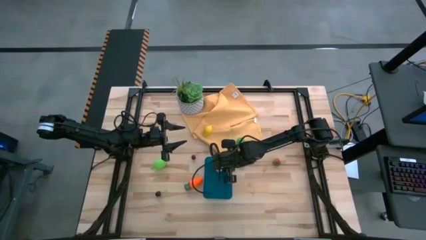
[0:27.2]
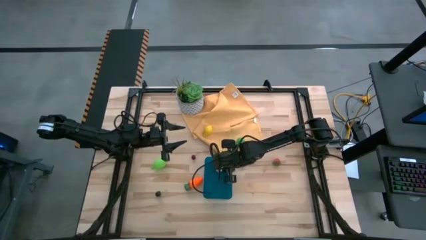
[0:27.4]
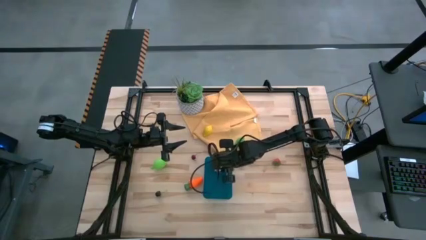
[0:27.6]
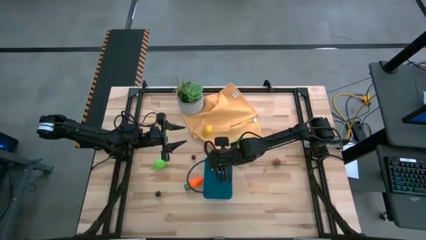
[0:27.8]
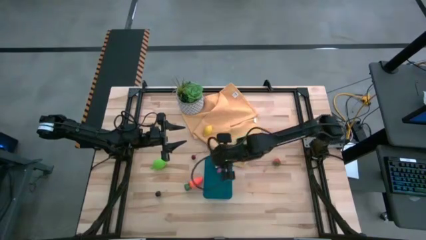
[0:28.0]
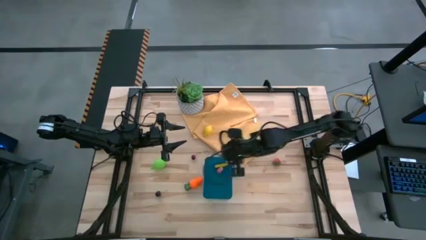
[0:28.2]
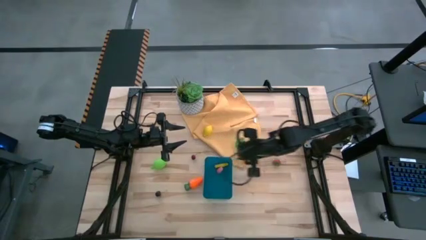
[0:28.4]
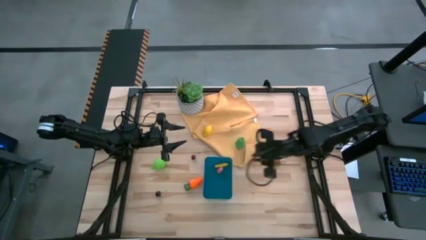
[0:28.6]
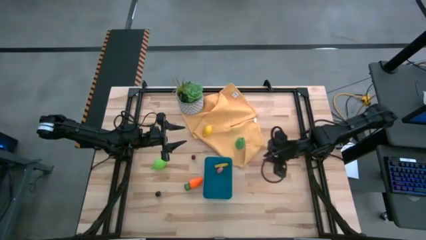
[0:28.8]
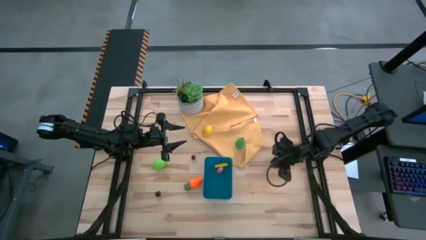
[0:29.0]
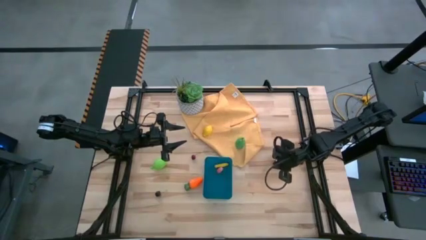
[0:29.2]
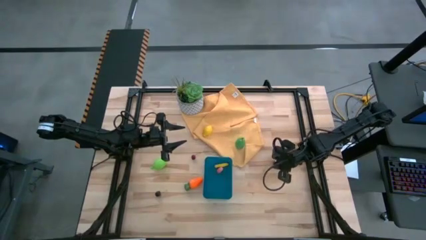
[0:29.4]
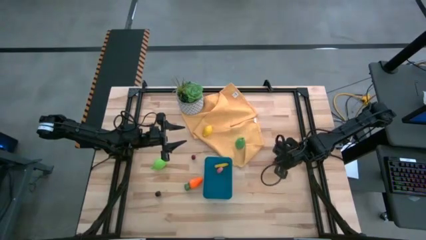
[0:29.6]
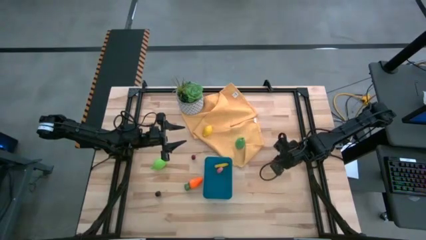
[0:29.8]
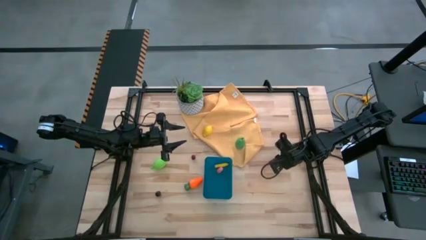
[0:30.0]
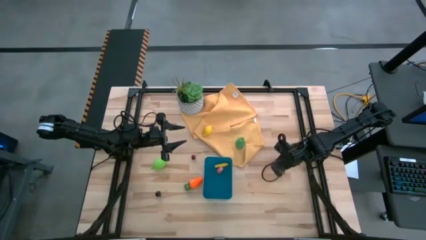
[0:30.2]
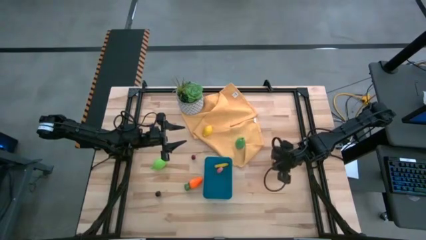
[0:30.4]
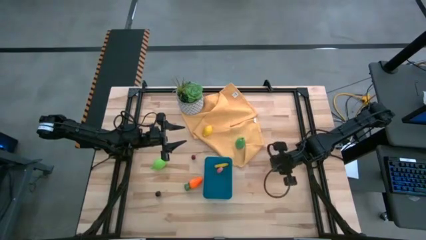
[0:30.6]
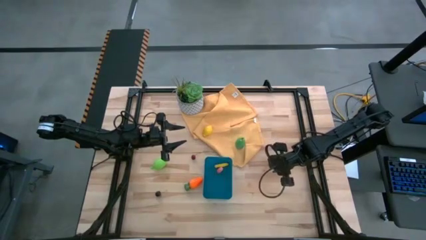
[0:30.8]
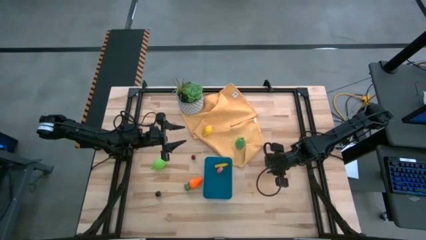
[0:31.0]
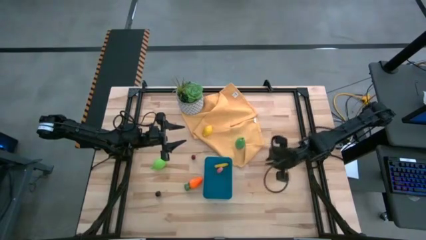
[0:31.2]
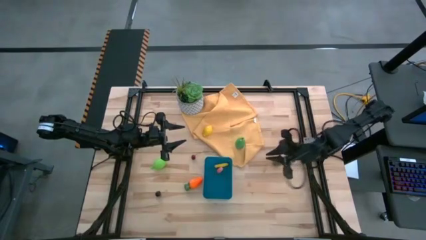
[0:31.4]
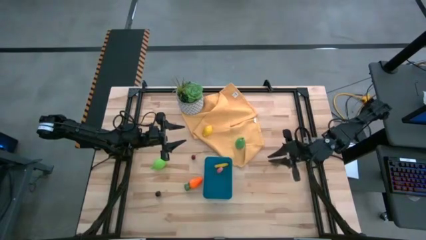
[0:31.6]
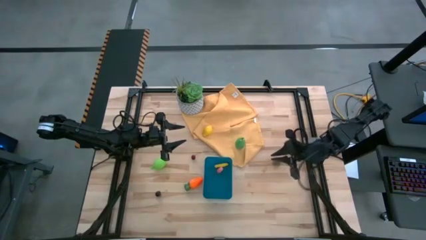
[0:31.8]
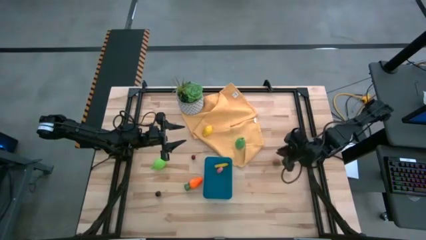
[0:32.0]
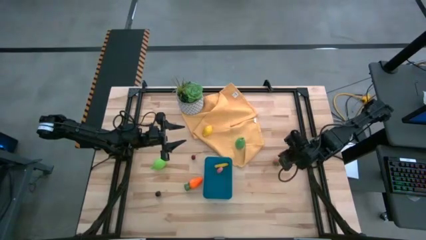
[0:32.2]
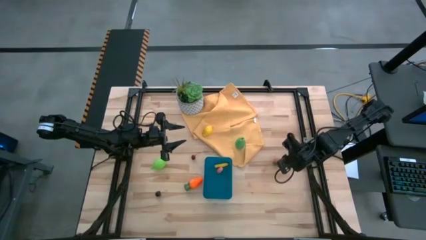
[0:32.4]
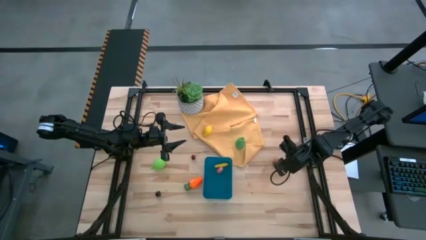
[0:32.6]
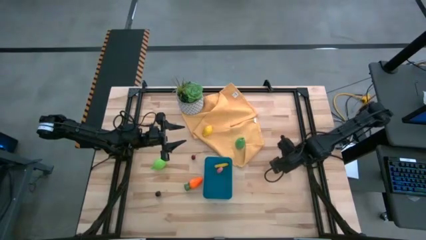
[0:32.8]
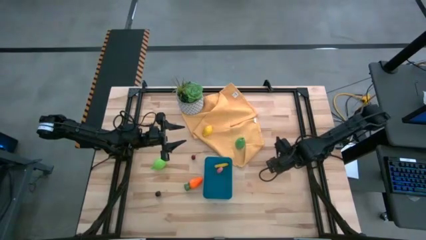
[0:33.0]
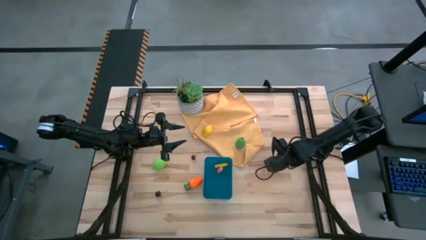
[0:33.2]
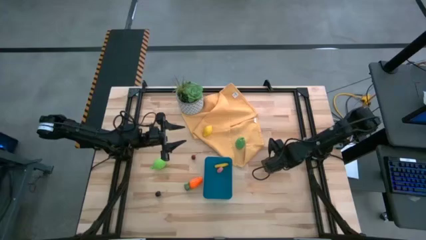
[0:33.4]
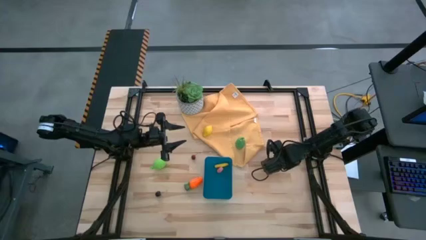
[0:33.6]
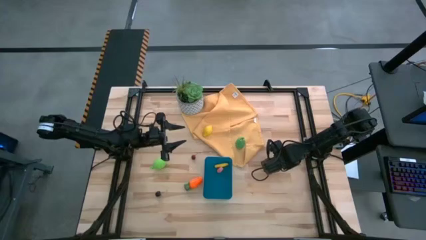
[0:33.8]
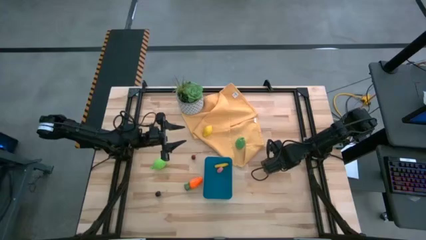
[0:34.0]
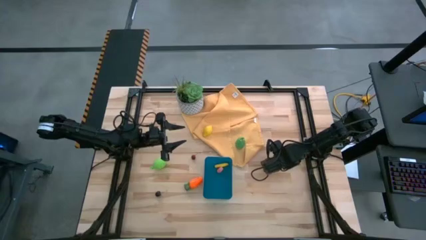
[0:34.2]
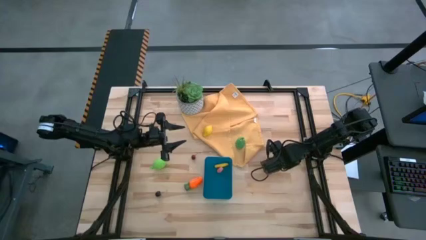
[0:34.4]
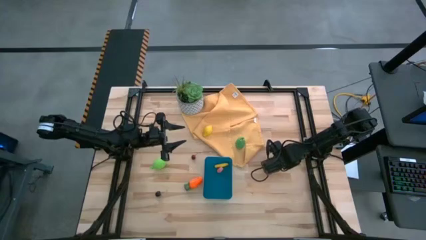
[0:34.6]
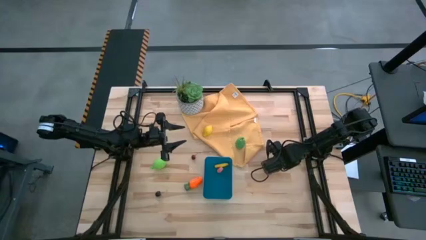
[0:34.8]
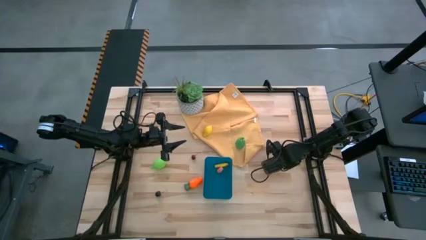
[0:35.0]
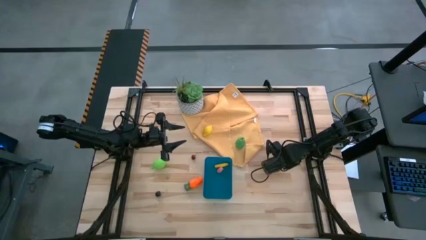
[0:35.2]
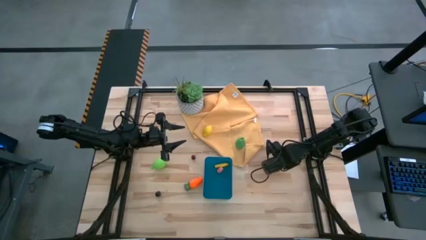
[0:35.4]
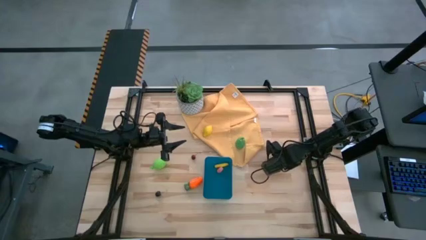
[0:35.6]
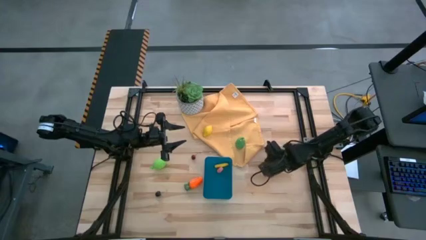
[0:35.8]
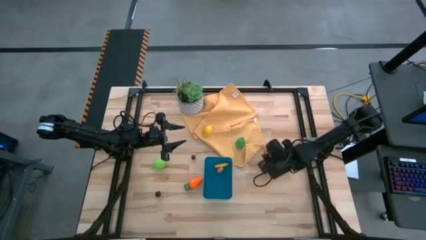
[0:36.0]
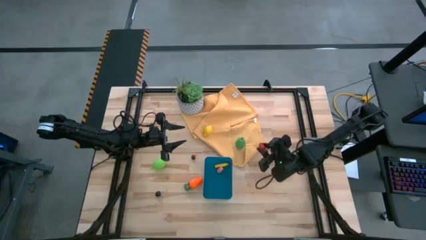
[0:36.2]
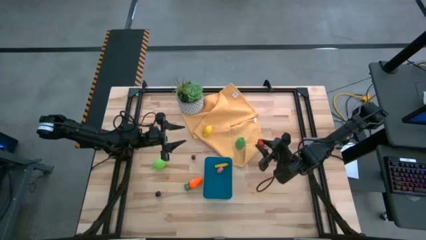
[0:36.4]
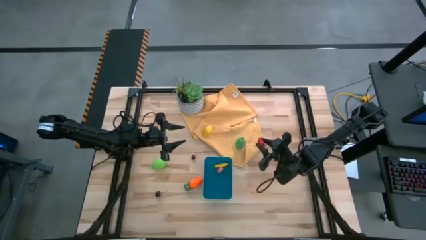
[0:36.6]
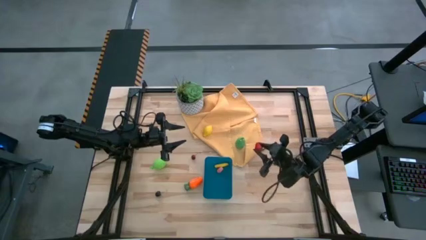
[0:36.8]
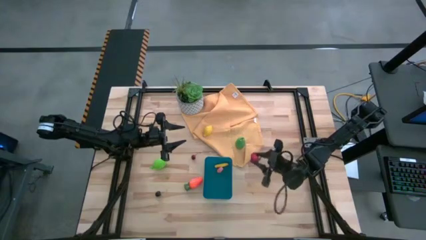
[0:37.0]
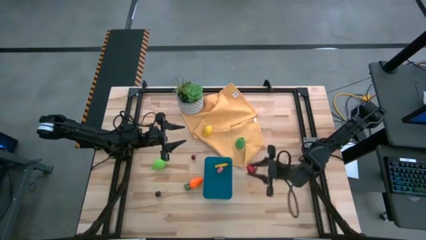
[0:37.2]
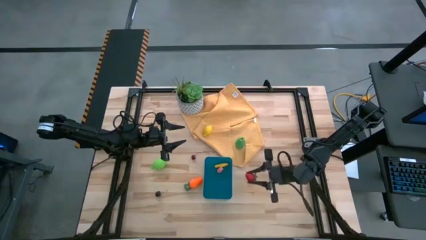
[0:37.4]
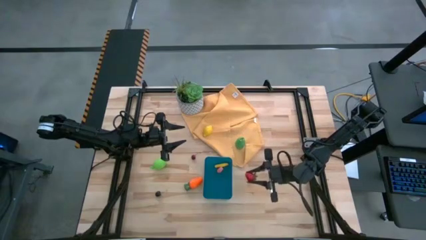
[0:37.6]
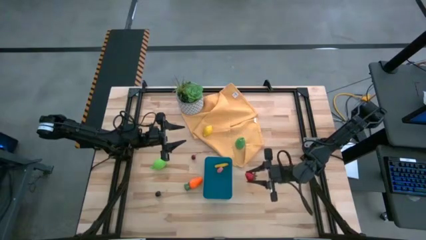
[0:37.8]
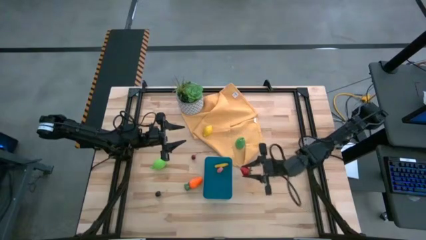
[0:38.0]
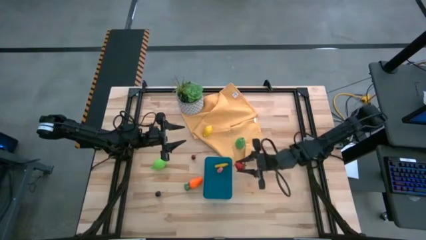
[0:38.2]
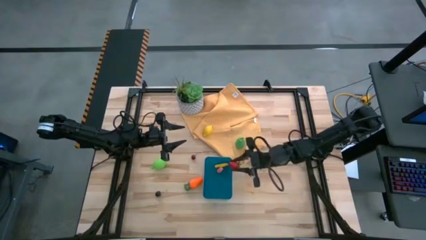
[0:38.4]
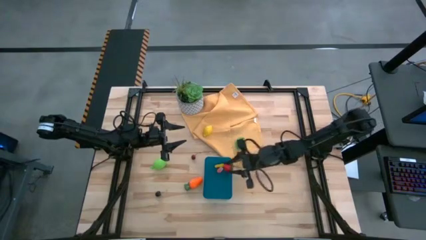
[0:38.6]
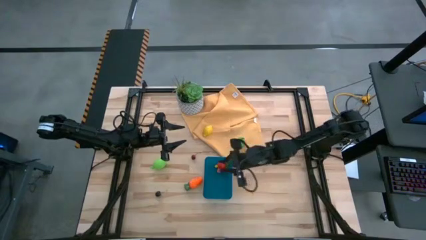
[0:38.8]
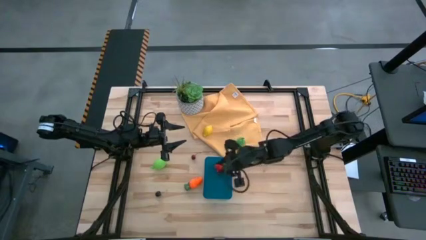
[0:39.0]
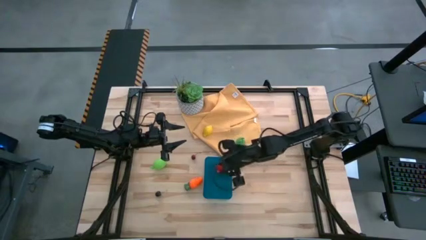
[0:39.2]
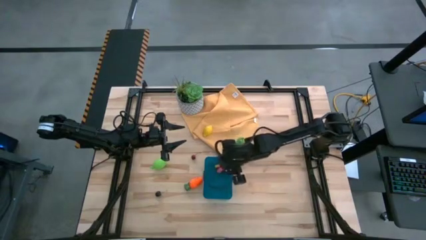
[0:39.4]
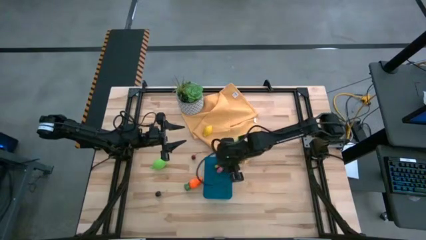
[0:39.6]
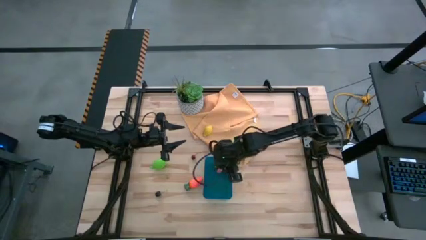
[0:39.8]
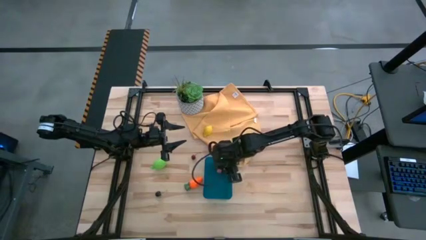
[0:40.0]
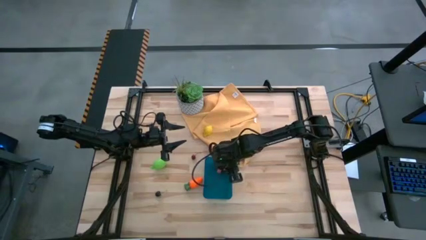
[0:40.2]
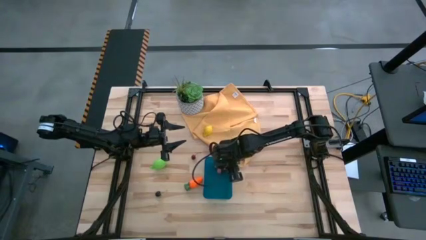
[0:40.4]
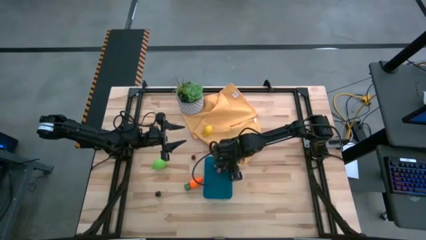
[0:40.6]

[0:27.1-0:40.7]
Task: Pick and placing Produce into tupperware
Put the strawberry into the bin
